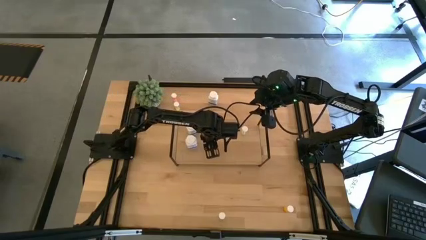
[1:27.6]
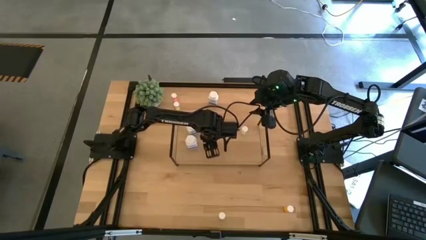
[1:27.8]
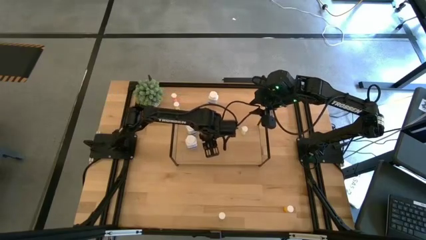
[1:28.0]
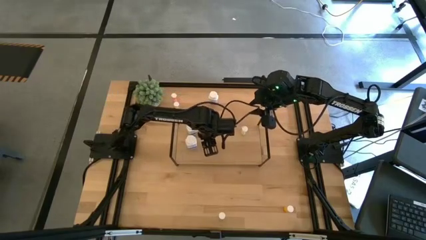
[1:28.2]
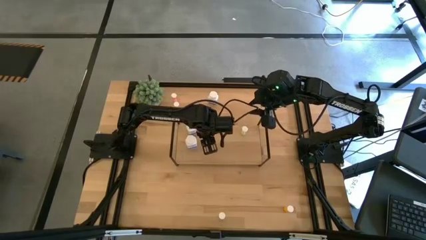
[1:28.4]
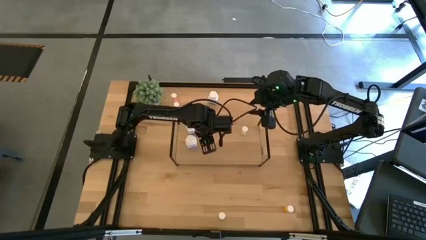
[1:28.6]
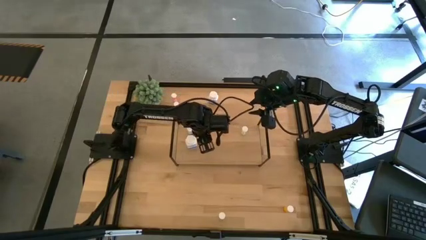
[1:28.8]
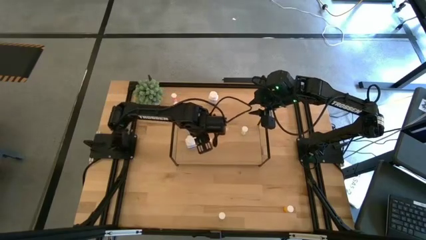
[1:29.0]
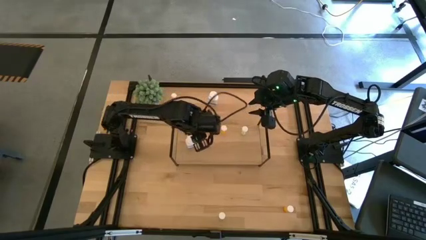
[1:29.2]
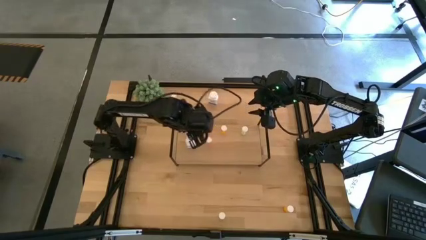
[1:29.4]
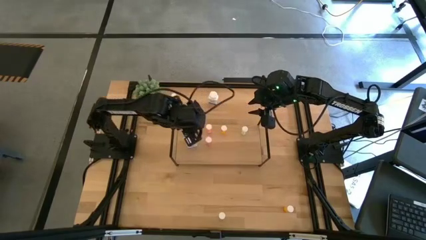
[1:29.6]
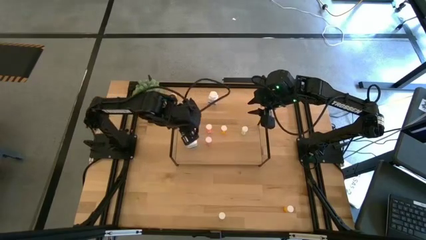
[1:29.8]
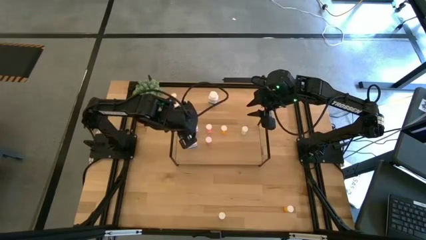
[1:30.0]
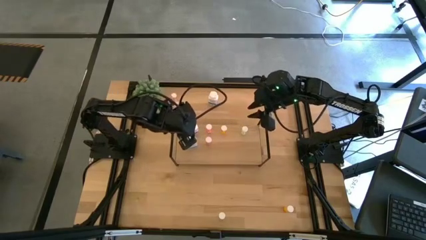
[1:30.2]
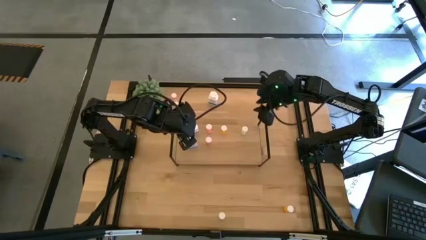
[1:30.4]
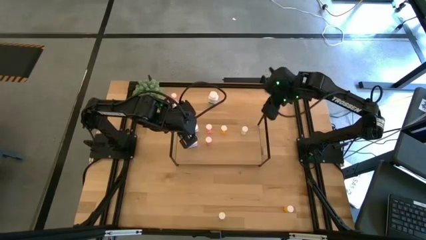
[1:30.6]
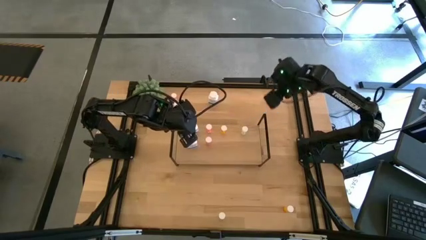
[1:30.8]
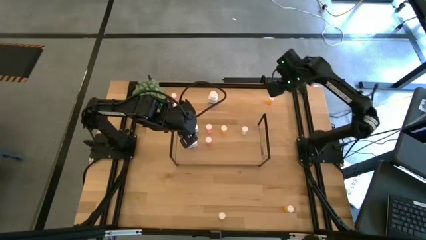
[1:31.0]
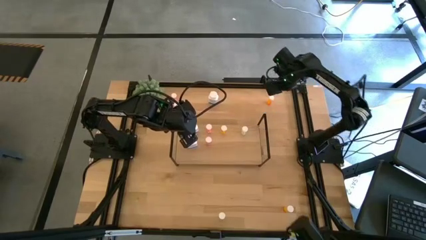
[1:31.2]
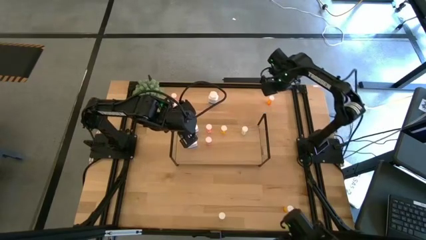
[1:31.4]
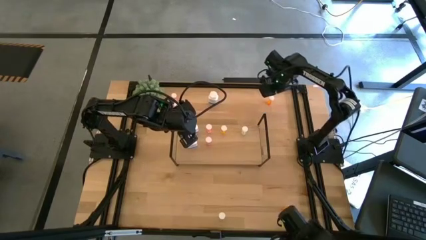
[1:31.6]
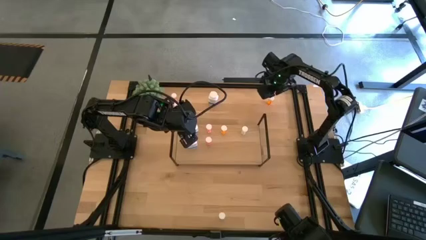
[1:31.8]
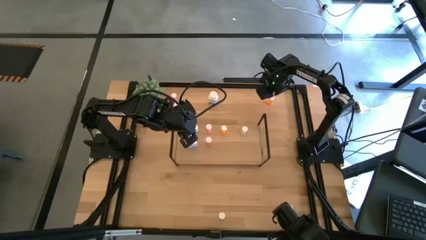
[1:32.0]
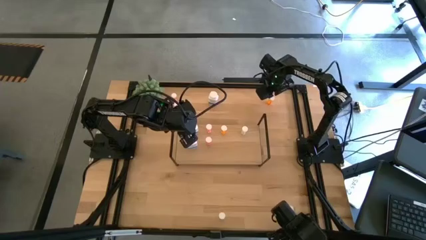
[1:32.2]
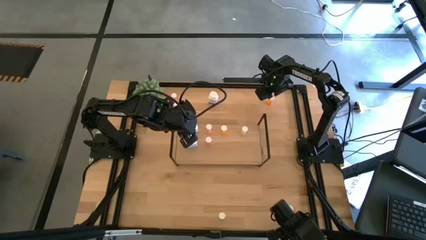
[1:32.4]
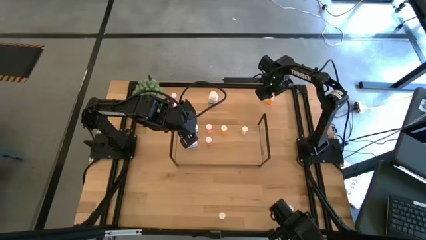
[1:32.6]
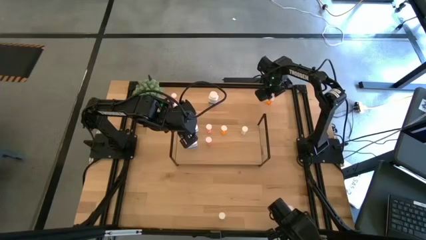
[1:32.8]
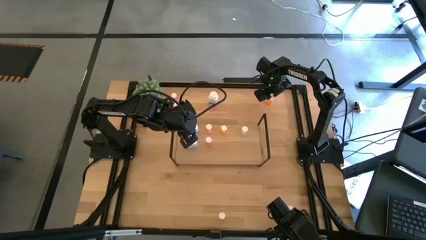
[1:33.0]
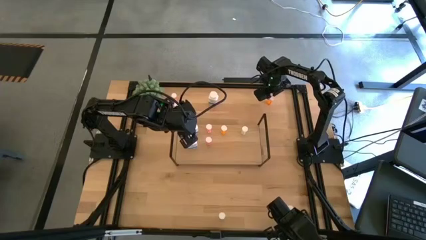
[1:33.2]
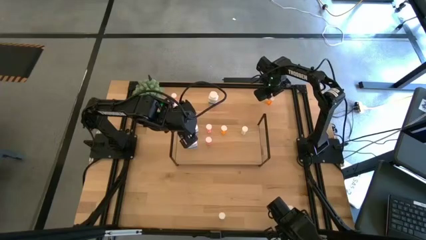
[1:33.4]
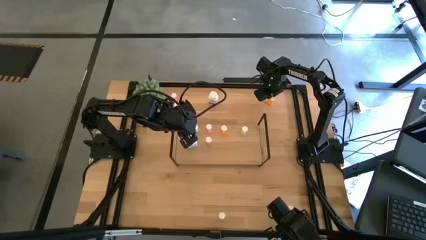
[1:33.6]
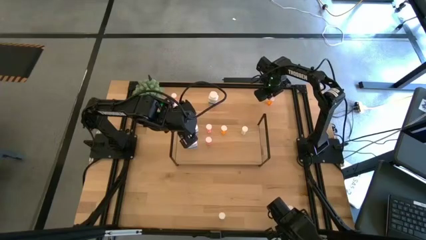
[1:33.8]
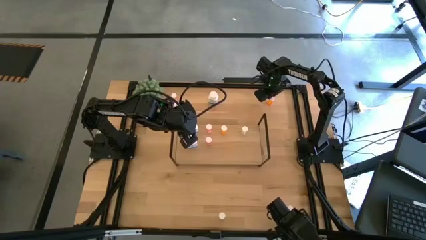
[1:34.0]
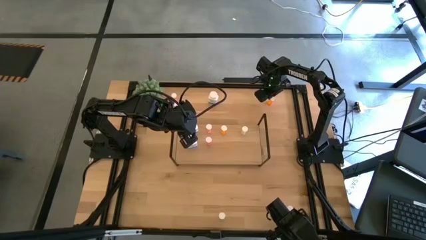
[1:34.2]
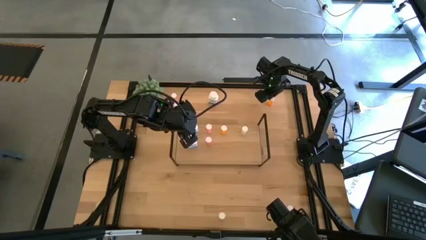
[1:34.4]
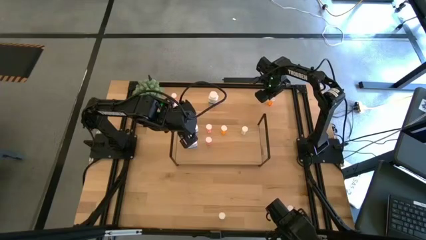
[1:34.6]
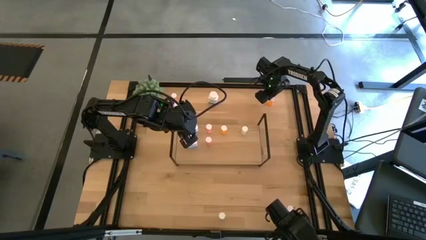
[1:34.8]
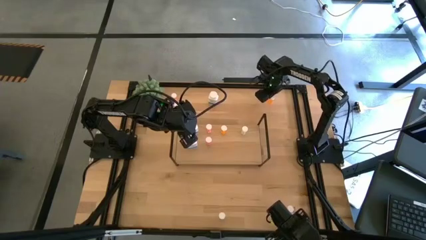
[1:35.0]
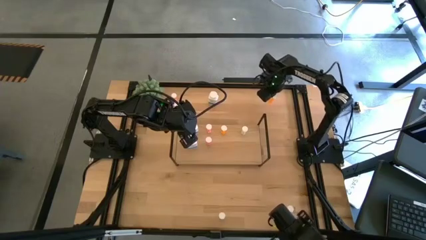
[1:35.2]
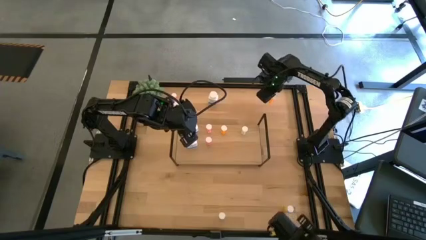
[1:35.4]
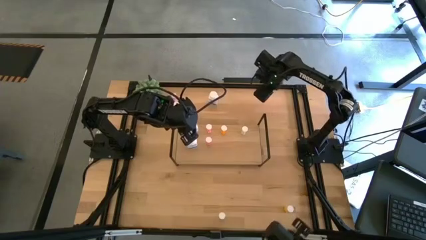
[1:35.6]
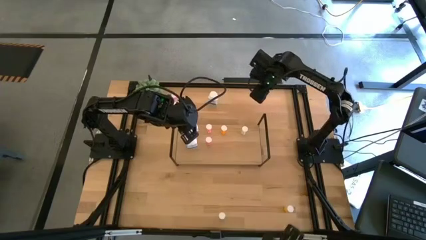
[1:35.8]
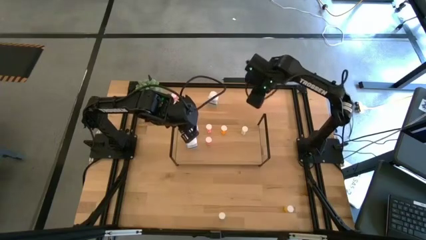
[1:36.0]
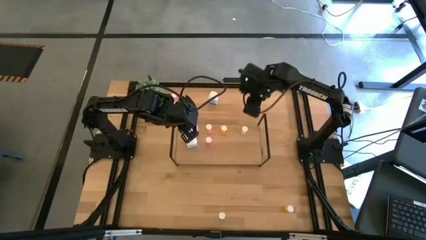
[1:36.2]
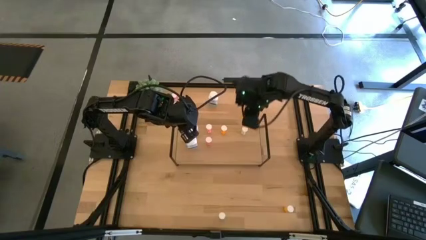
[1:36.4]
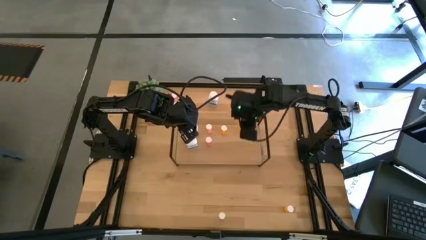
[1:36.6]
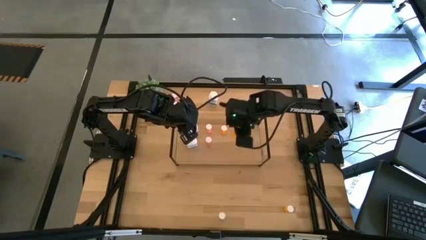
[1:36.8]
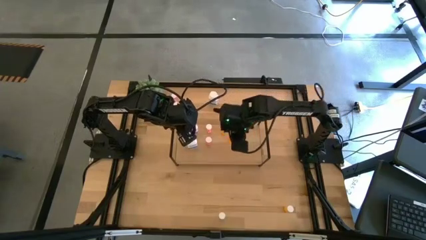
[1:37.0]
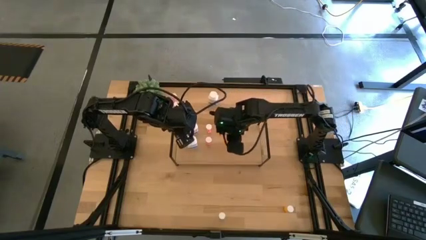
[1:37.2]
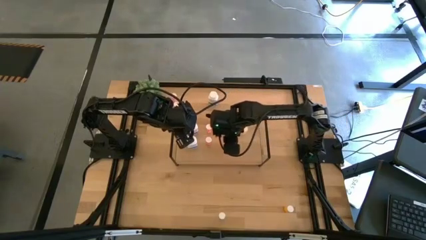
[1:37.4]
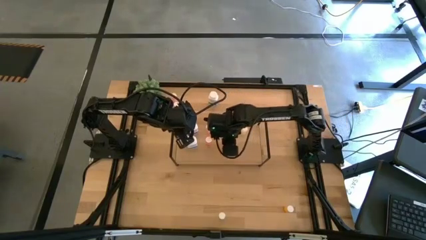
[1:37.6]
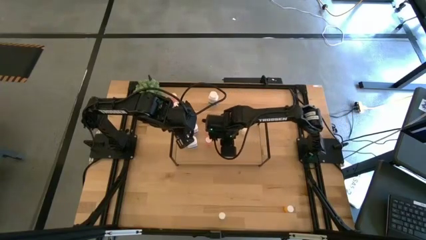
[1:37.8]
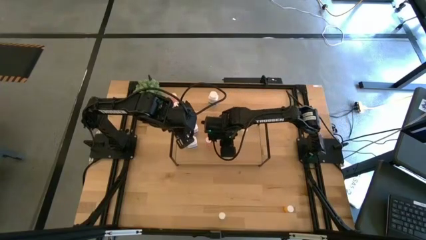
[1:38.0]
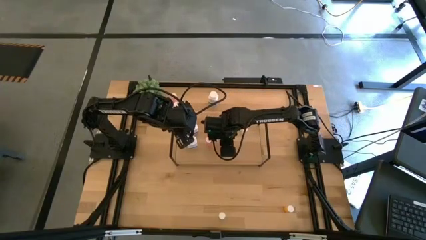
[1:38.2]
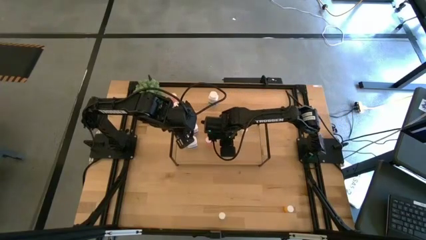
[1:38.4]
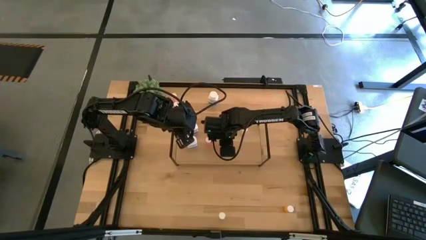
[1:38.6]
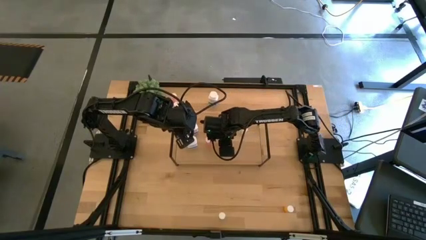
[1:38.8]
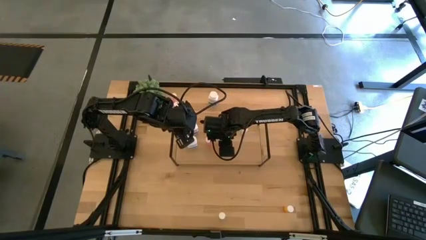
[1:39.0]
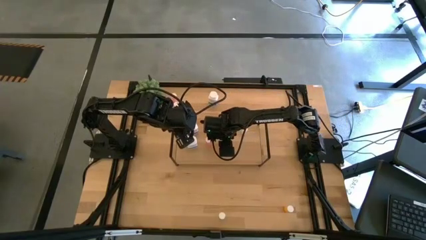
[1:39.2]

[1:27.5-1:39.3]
Task: Pick and place medicine bottles onto shelf by color
Put the top orange pill bottle on the shelf aligned with the other orange pill bottle

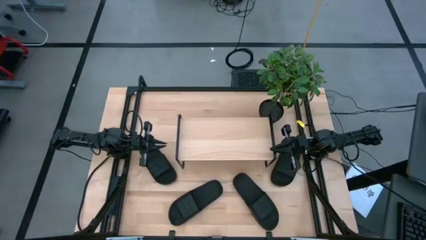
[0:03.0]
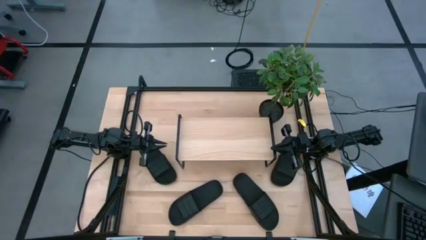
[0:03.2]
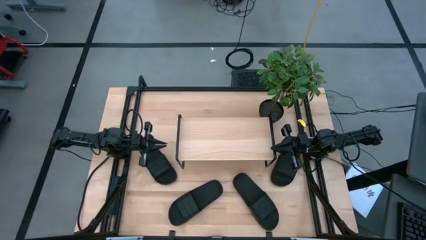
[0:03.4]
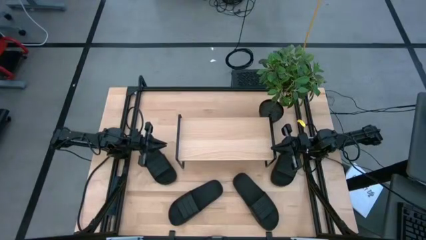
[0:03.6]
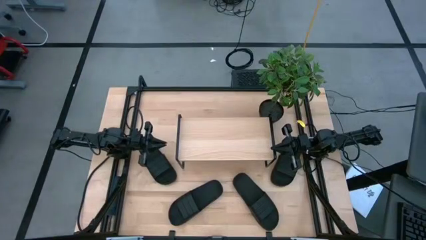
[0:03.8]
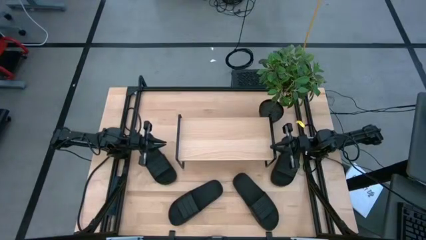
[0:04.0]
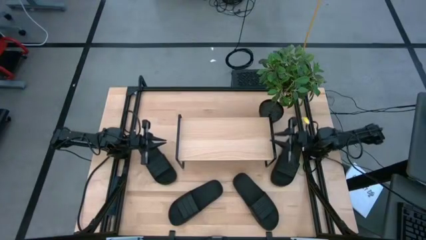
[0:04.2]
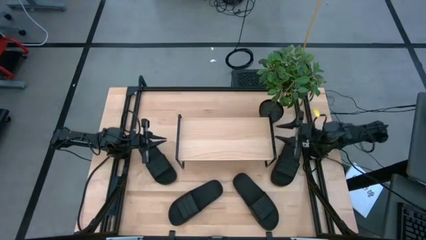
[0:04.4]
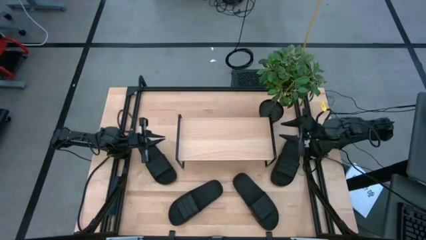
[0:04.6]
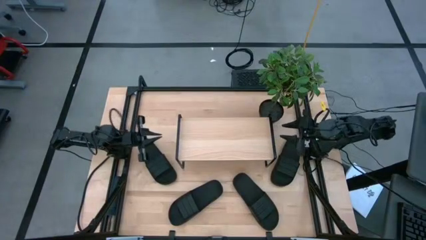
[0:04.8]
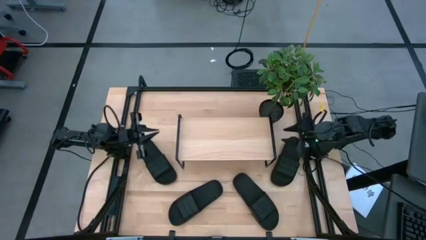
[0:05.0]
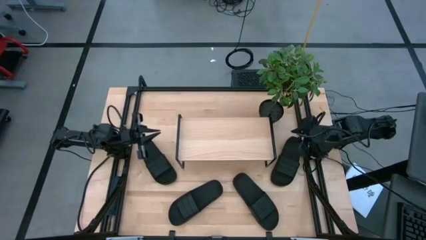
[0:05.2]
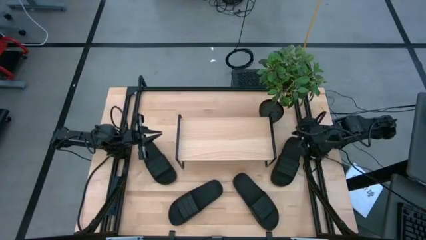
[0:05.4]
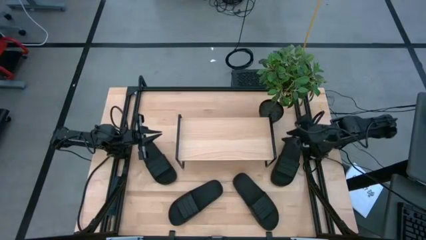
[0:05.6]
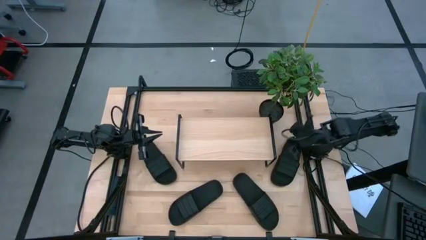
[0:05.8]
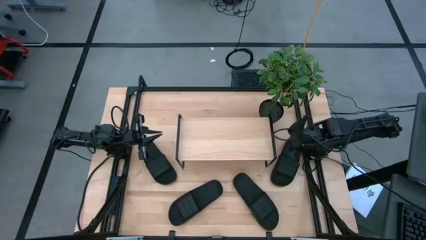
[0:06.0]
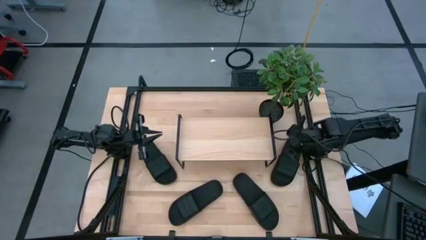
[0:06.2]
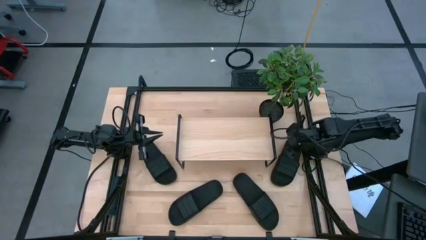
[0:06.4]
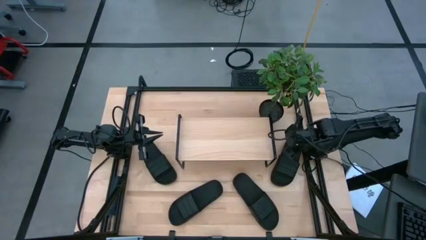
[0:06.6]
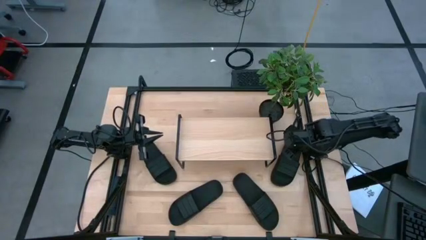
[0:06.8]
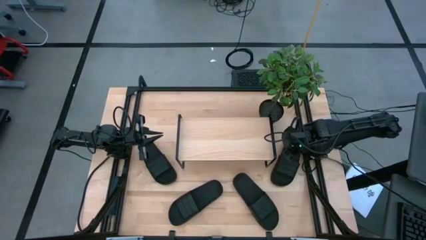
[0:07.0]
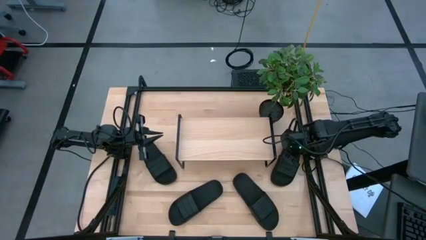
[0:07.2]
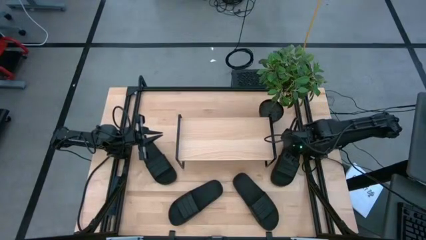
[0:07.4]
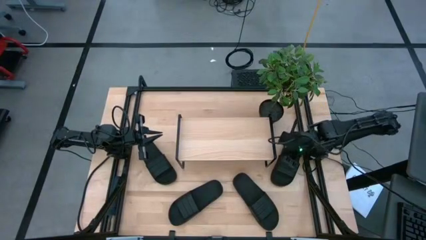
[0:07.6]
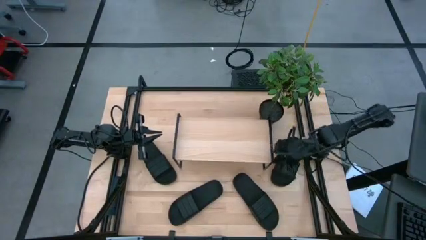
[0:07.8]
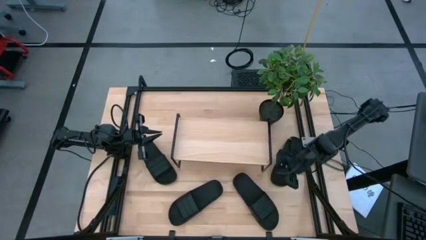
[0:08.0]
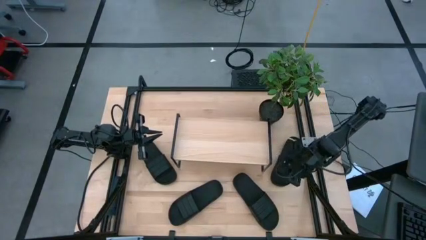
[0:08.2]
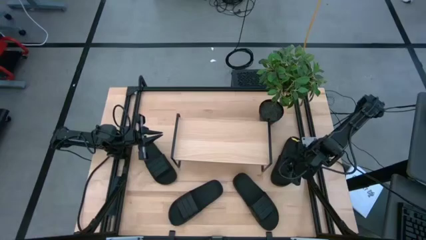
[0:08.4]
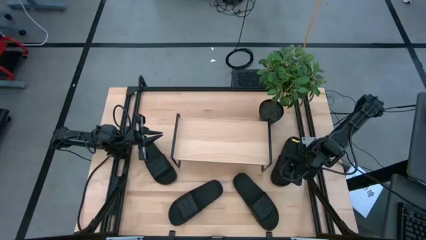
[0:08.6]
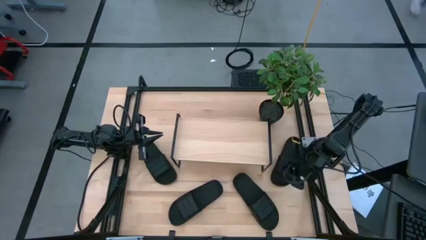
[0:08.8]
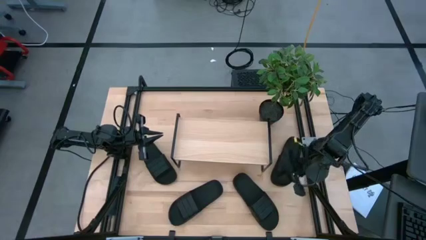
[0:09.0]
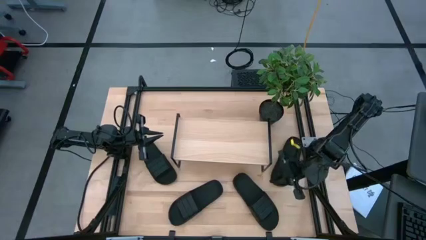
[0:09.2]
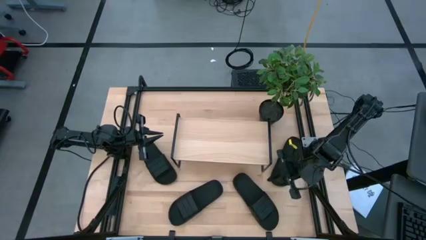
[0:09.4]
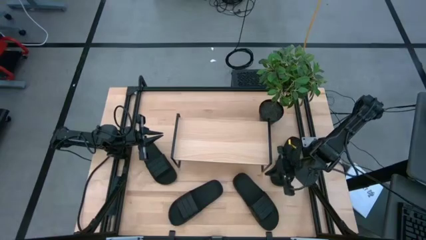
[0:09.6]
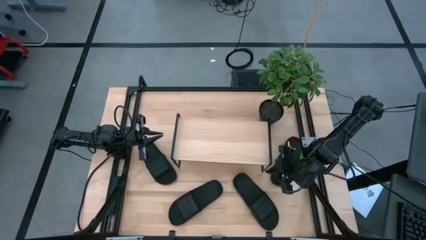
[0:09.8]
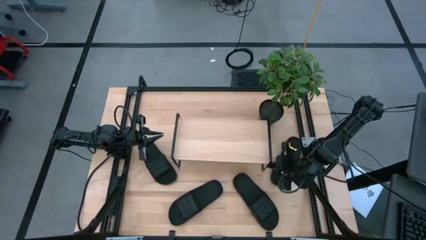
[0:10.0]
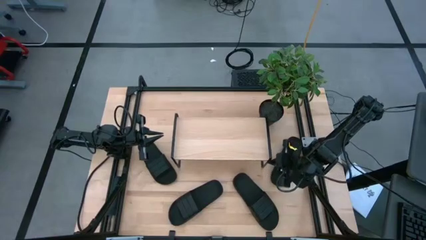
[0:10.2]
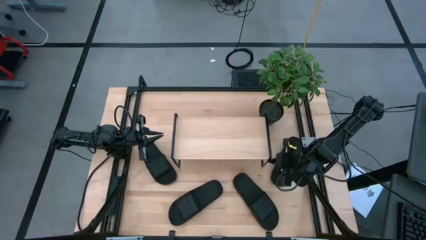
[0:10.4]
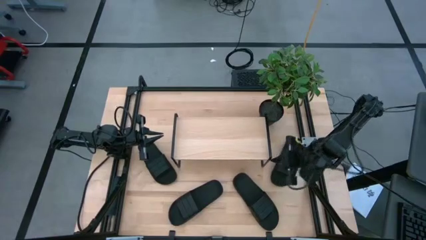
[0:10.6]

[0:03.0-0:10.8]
Task: Pick and place slides into the shelf
Adjust the shelf
